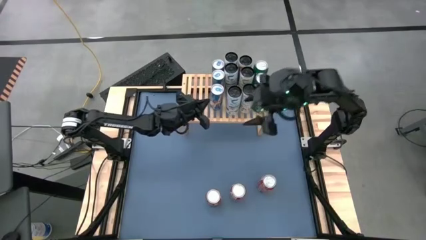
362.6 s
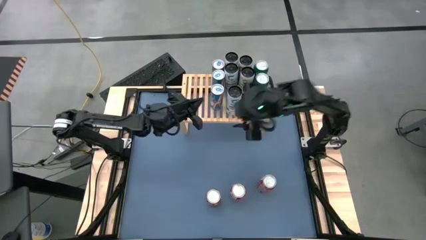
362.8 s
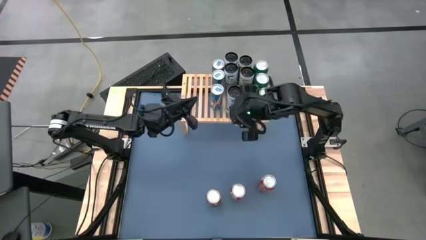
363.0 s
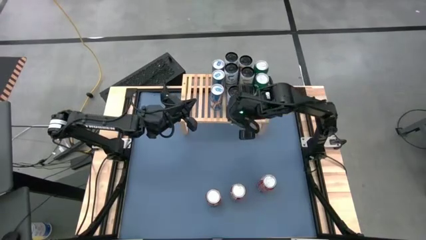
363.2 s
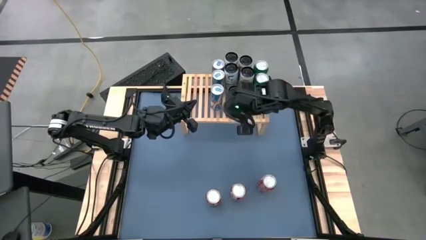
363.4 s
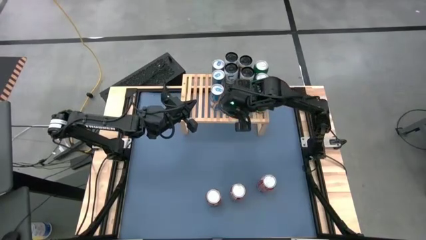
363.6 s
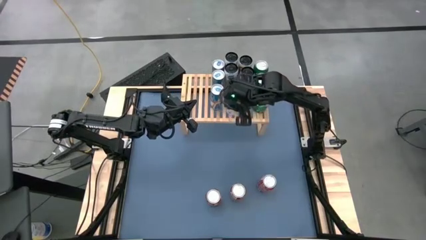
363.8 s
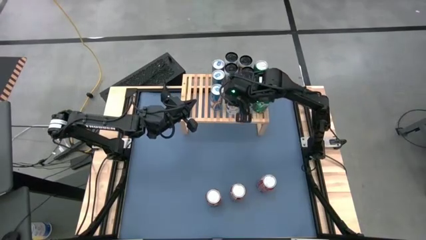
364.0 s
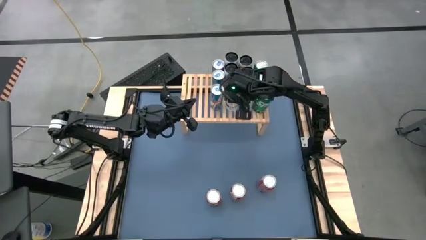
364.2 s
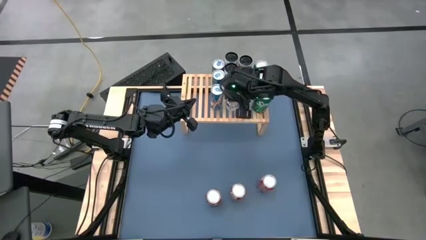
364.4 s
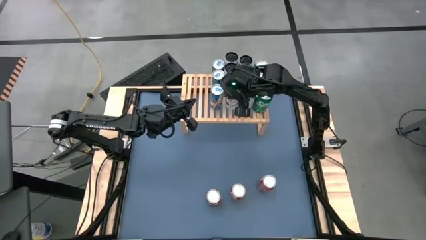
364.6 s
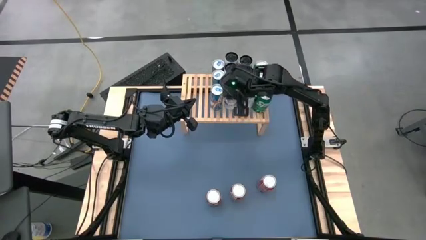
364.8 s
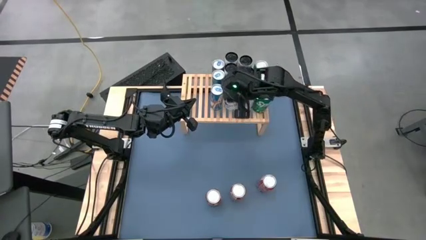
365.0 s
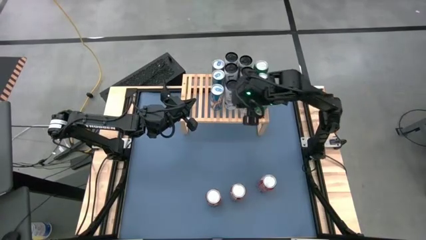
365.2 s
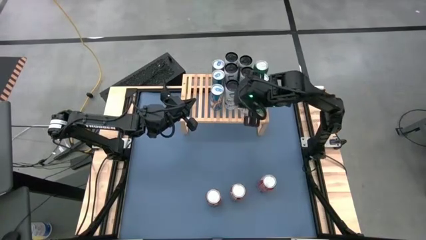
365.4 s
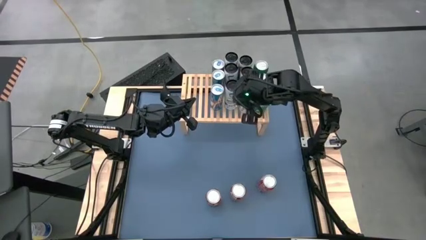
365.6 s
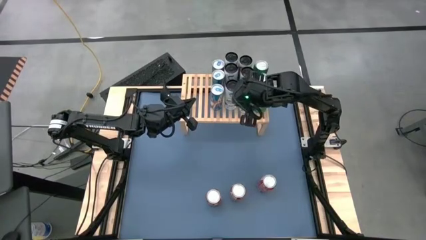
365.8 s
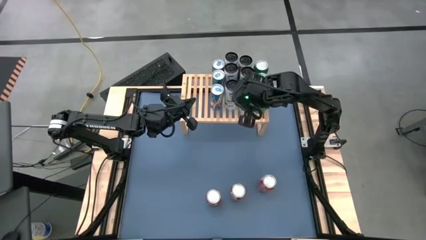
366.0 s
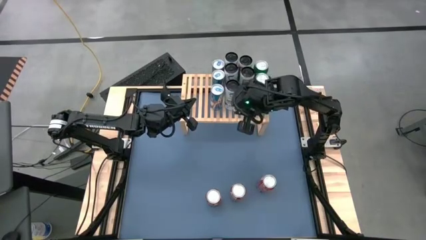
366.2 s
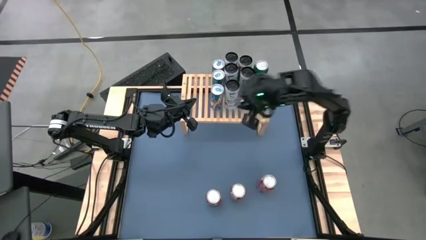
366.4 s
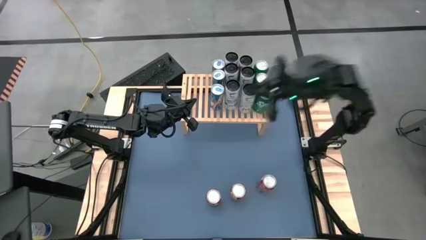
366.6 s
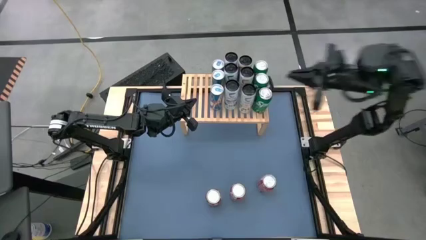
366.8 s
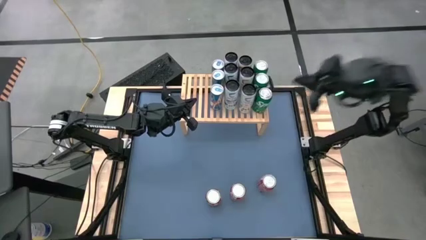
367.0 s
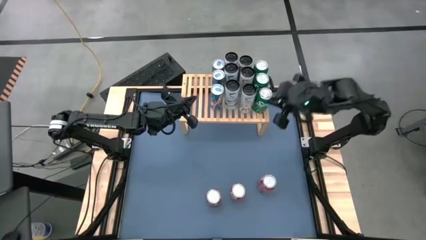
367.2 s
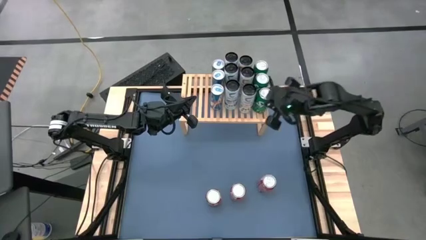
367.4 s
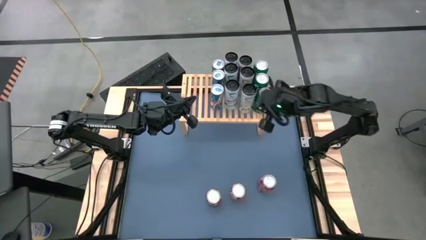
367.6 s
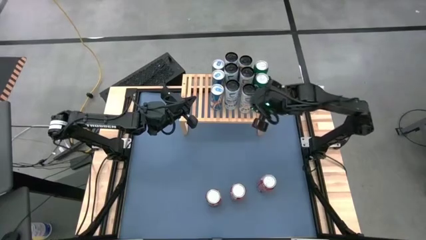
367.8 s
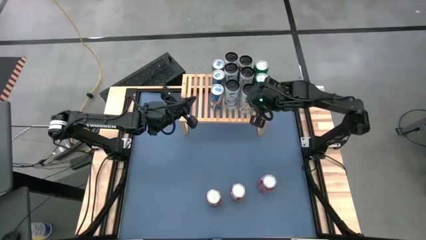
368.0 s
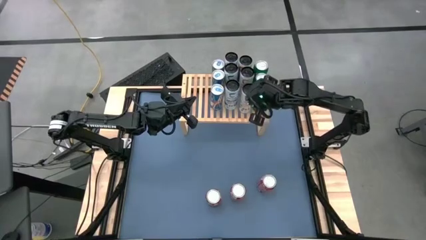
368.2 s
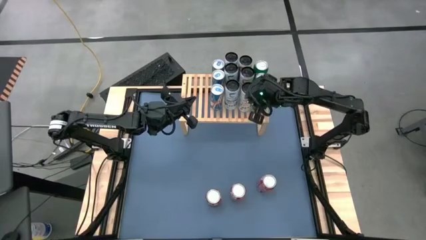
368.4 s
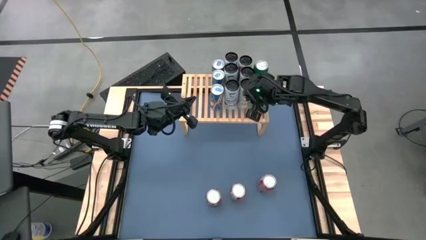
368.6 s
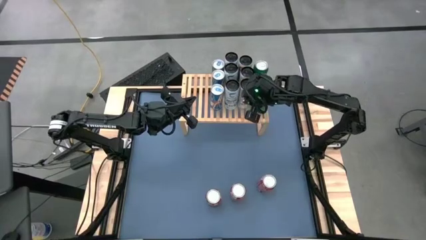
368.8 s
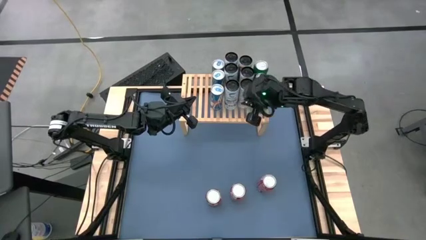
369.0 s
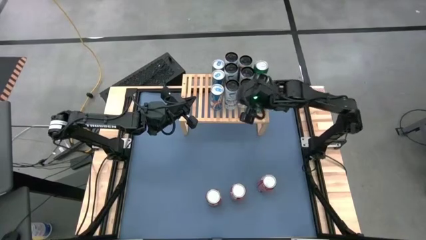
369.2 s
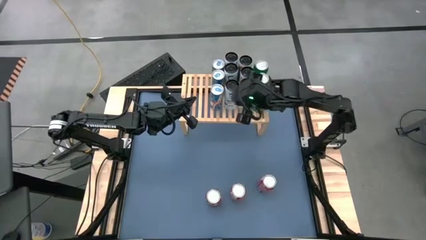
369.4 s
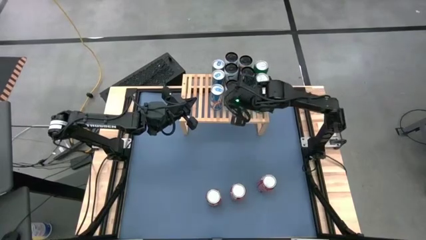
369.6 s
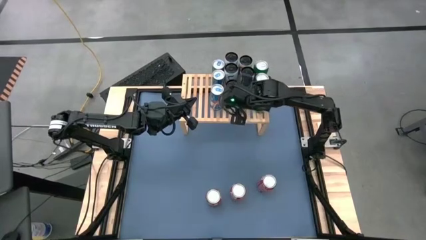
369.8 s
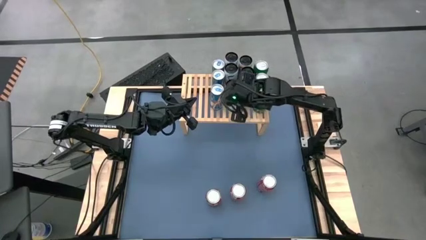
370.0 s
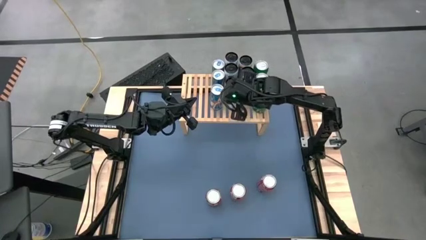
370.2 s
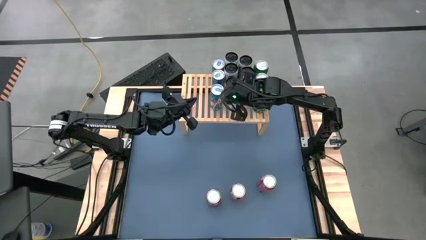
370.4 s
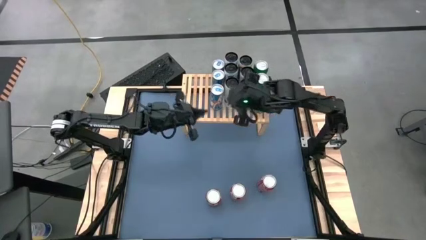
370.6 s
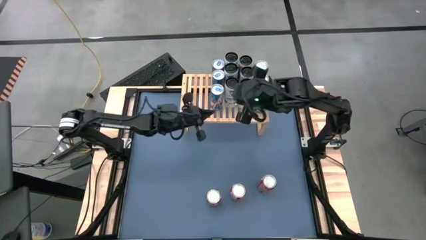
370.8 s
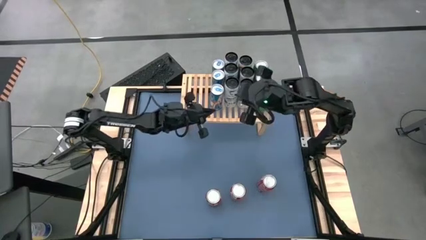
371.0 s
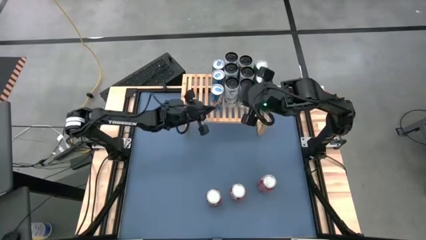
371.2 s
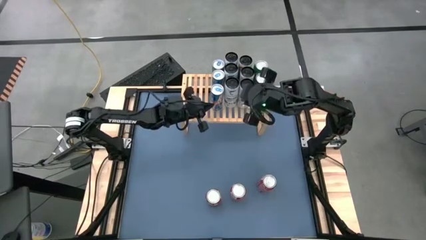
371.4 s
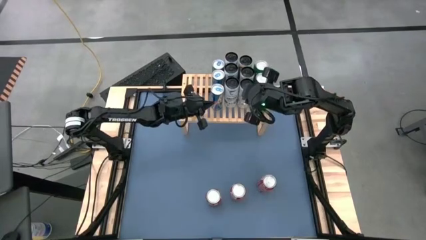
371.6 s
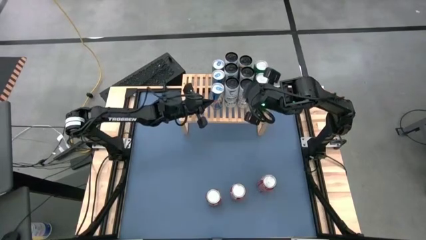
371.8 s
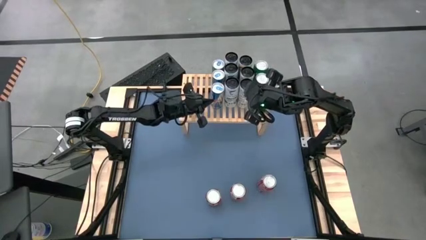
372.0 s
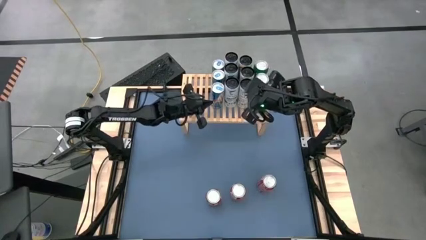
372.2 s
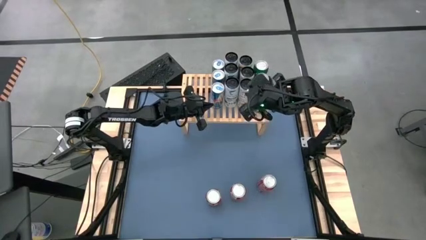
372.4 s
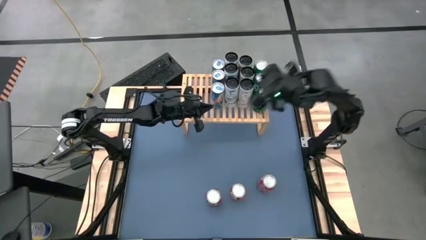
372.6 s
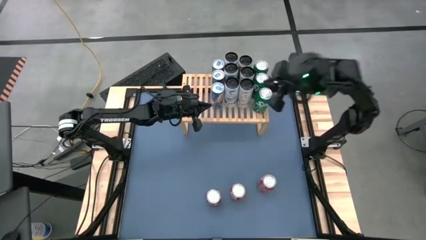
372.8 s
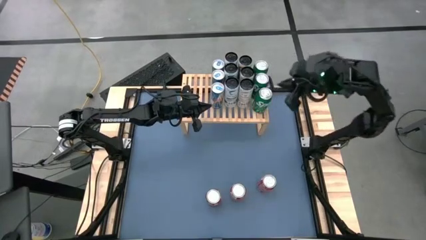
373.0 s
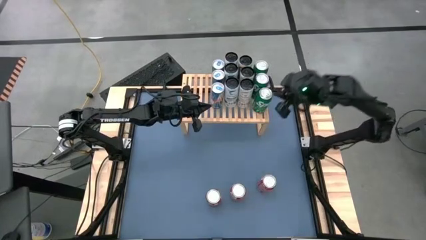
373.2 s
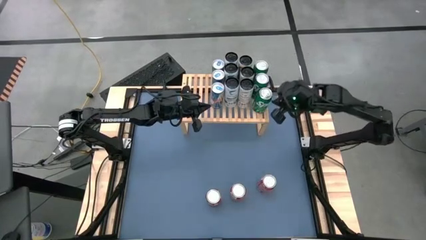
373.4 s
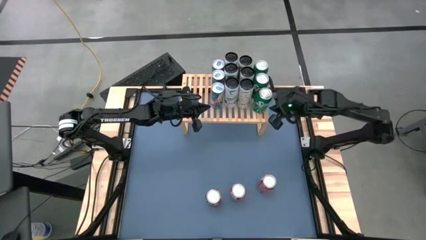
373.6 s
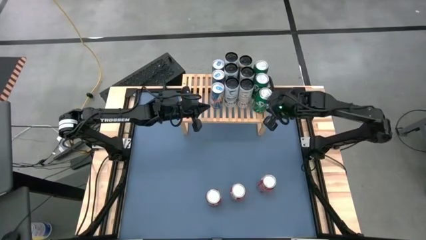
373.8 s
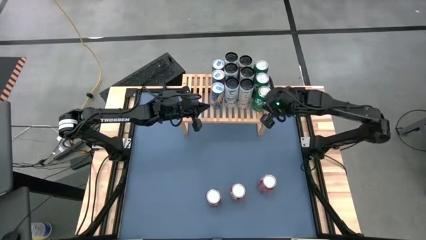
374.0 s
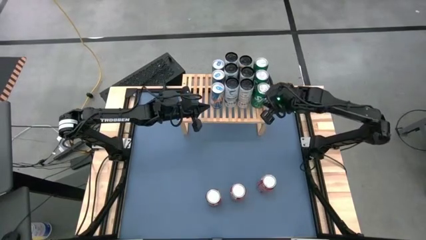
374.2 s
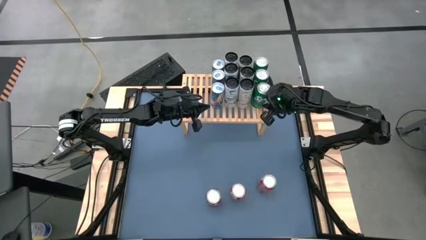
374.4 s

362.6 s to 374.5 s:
Task: Place canned beverage on shelf
Adjust the soda cans on the shelf
